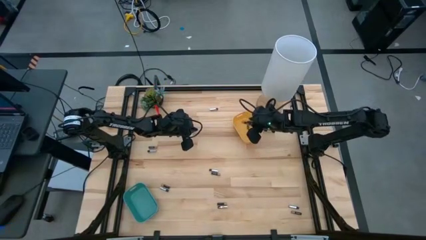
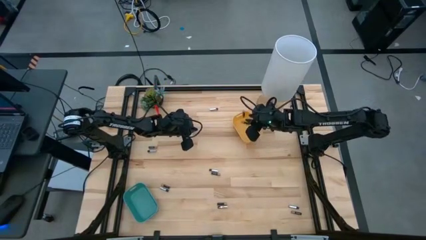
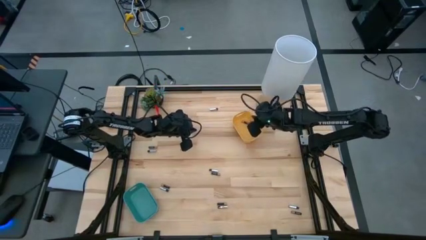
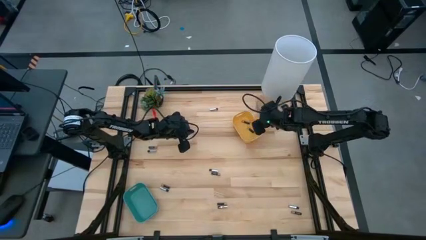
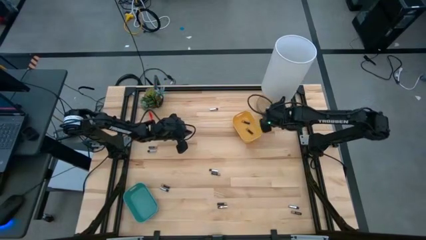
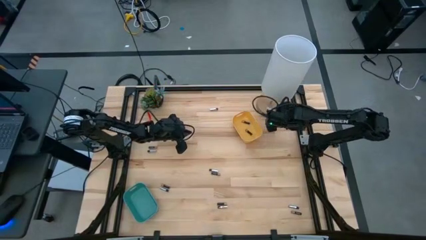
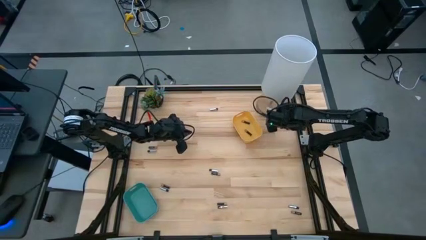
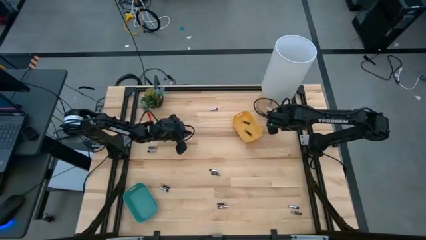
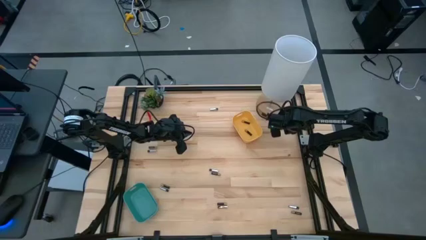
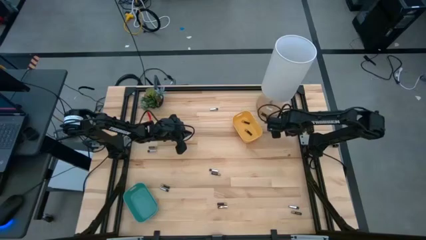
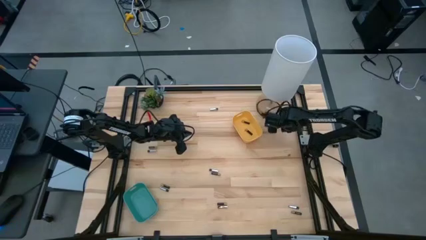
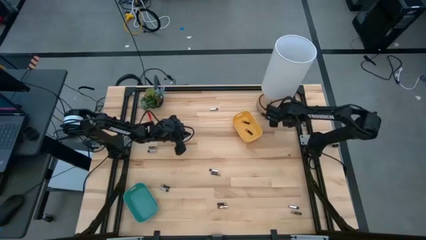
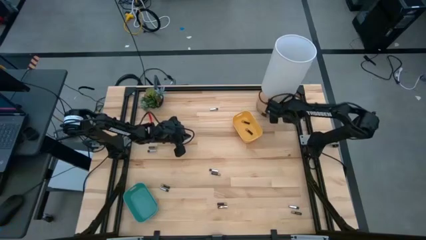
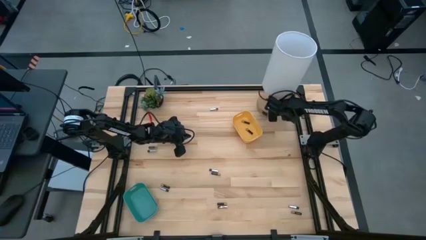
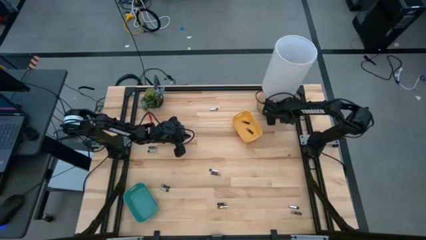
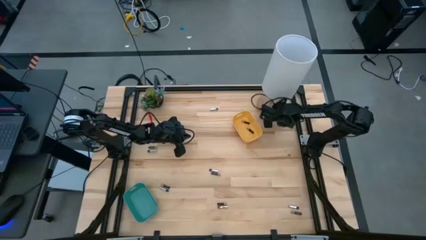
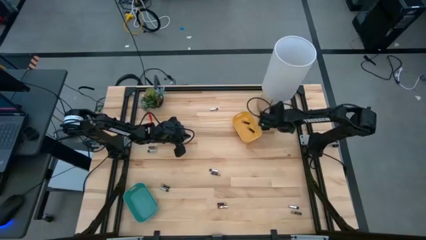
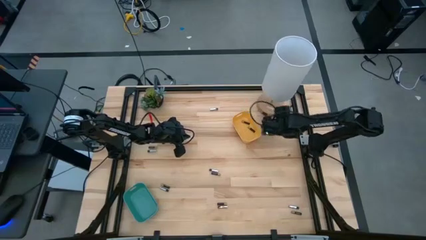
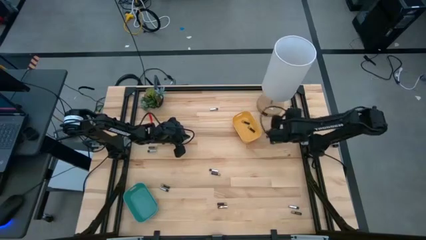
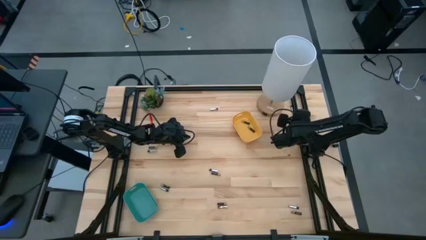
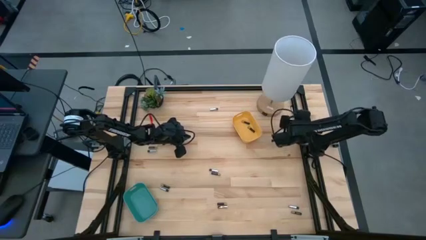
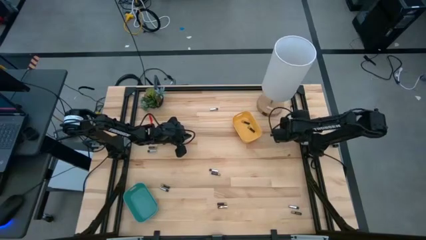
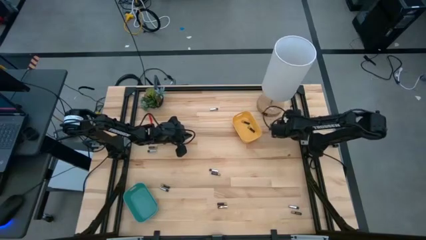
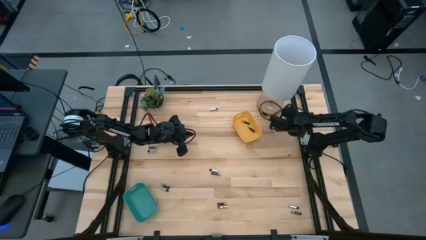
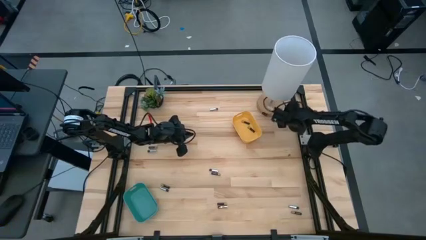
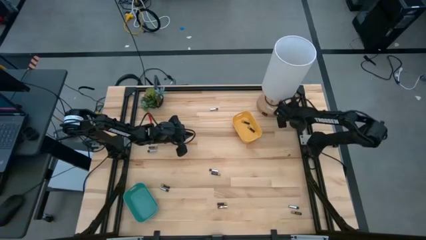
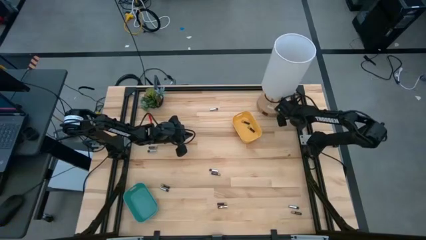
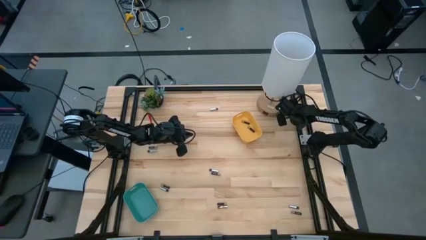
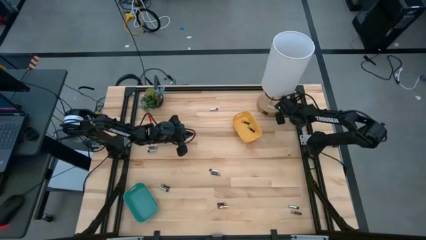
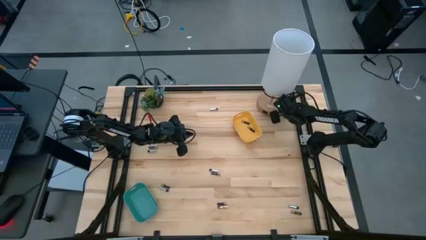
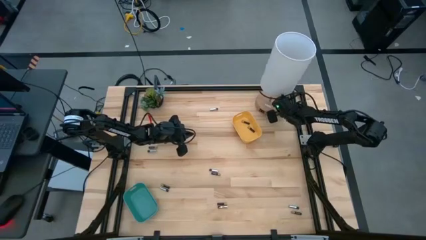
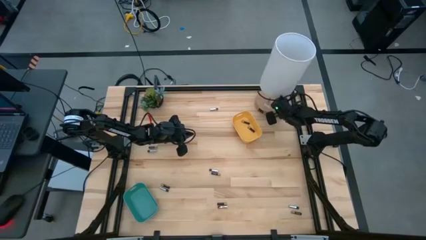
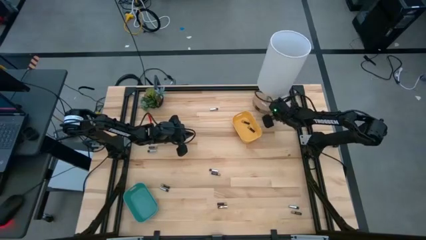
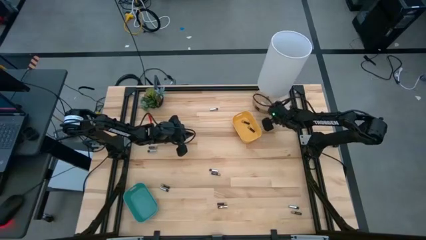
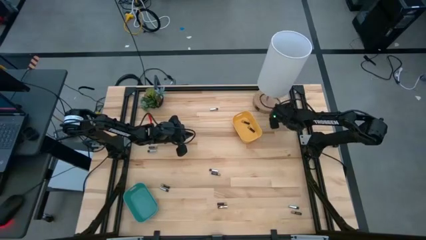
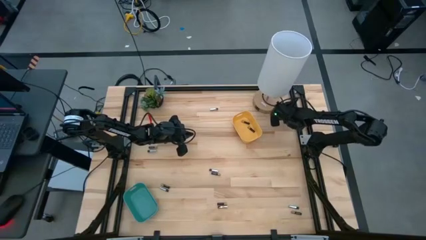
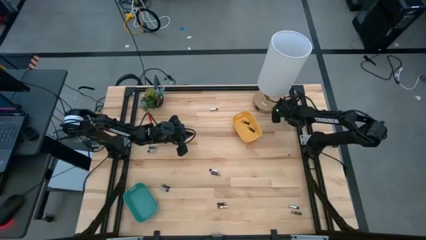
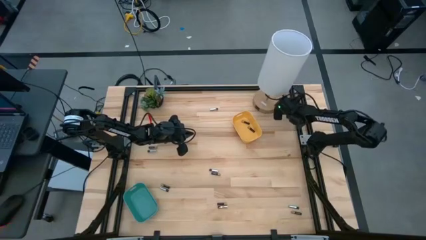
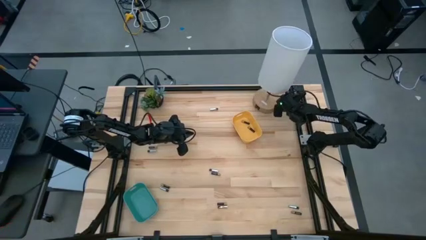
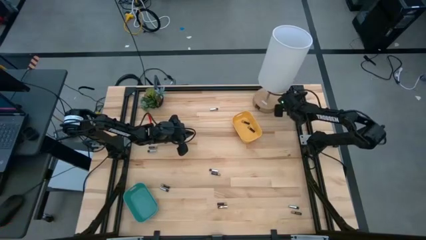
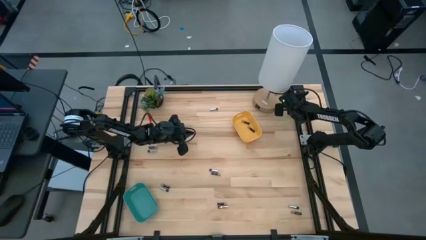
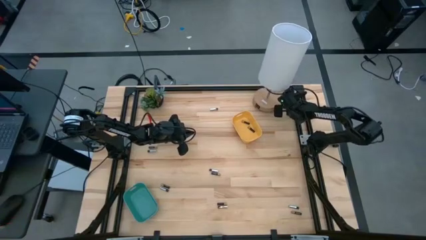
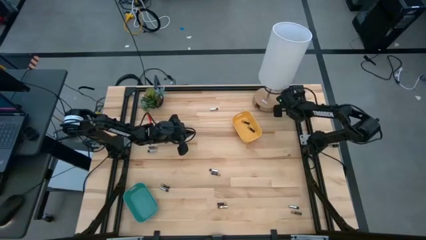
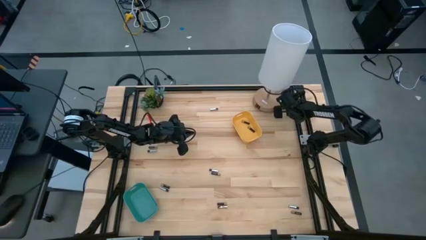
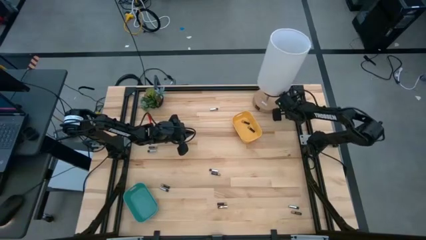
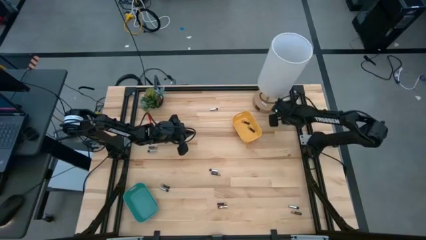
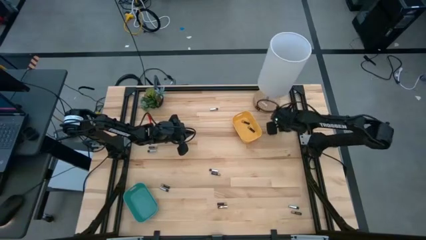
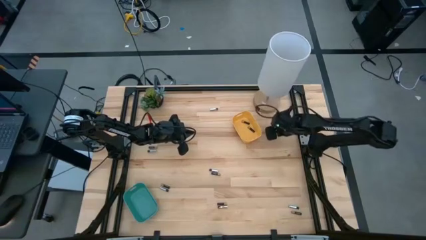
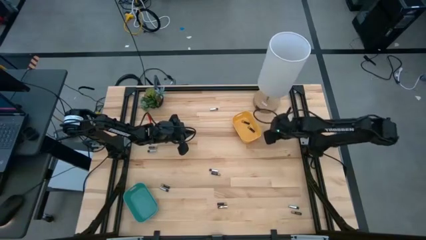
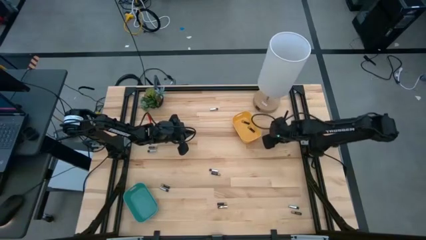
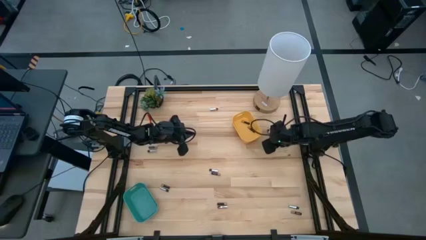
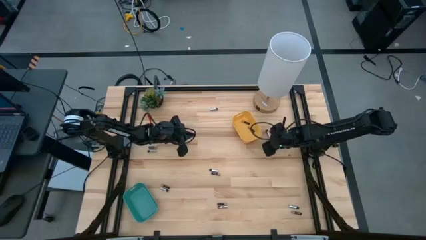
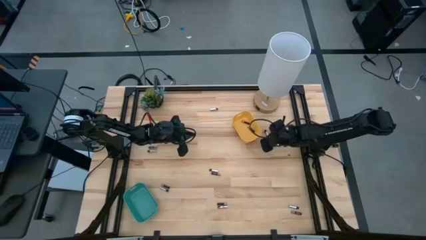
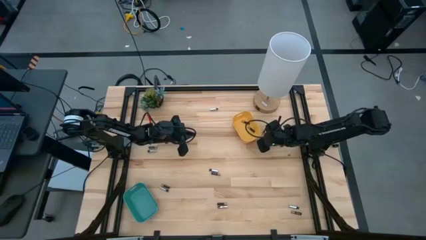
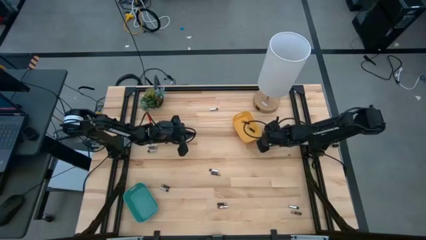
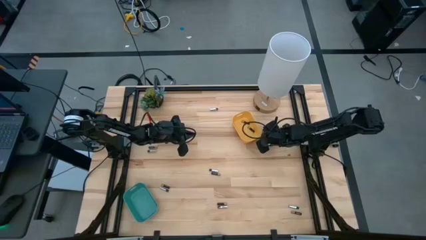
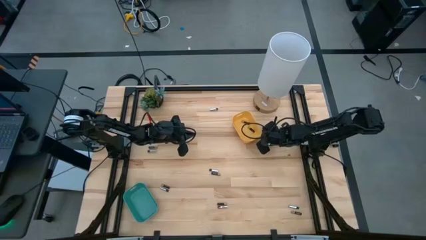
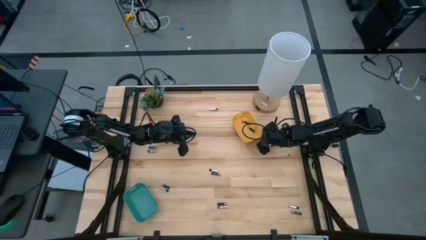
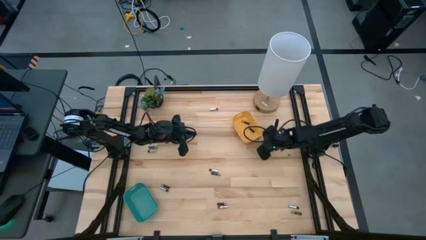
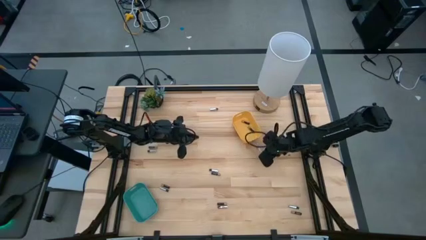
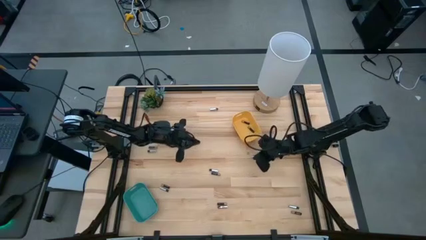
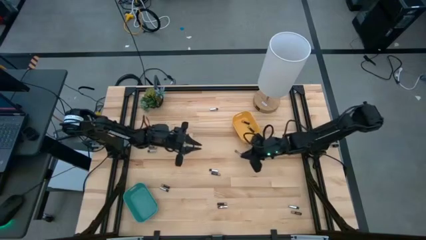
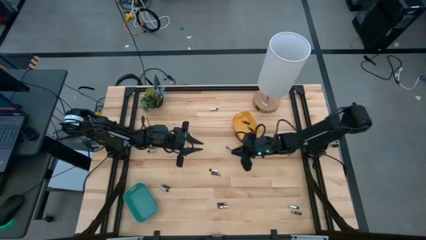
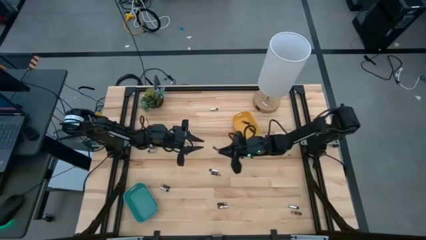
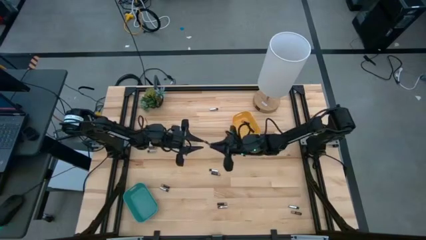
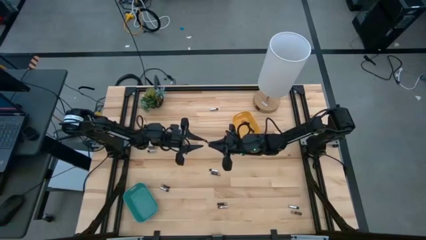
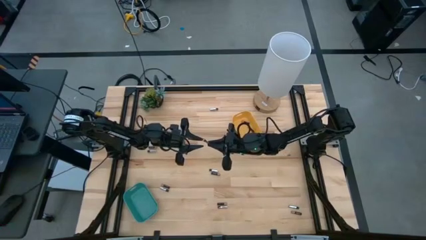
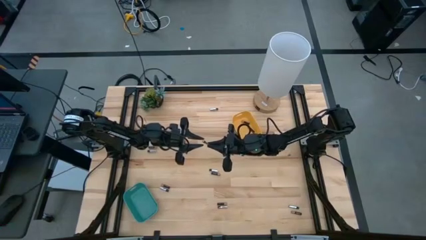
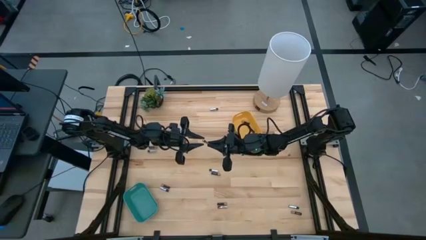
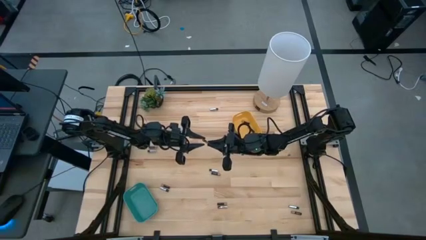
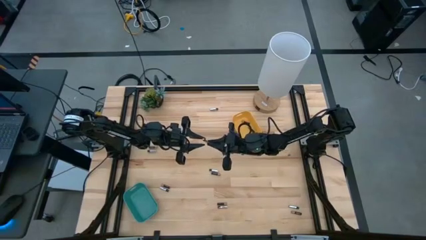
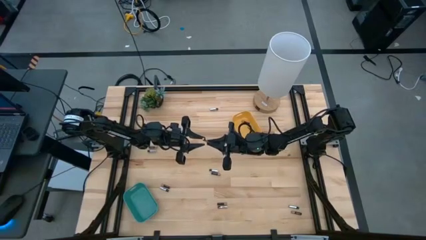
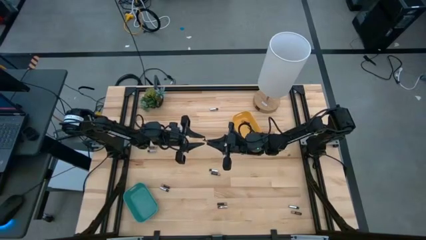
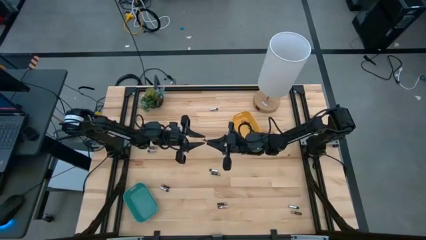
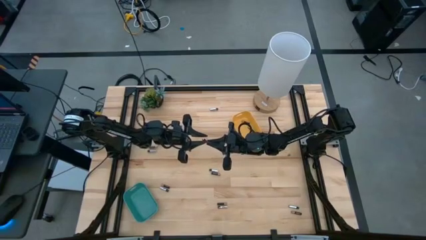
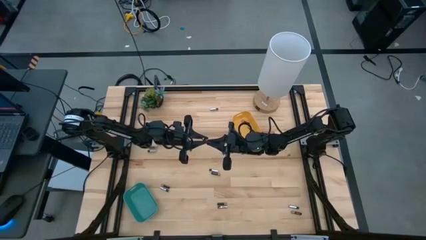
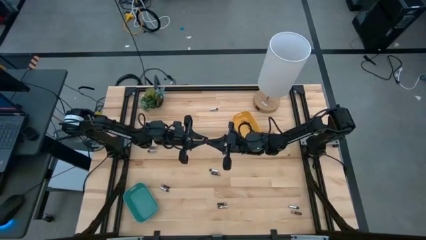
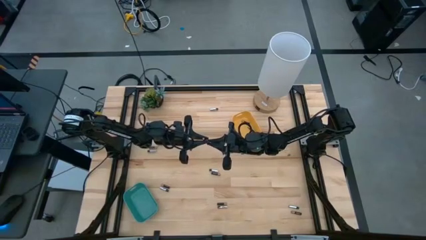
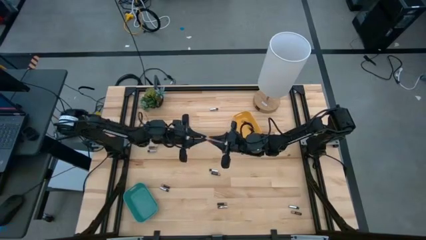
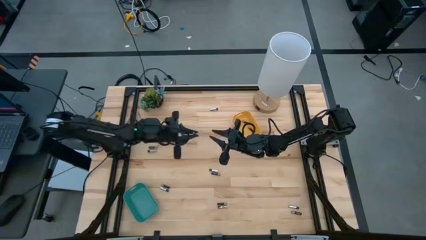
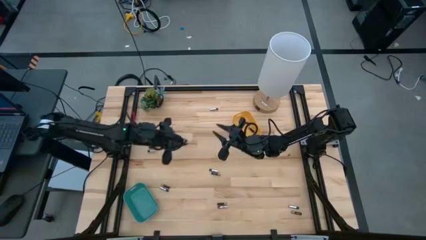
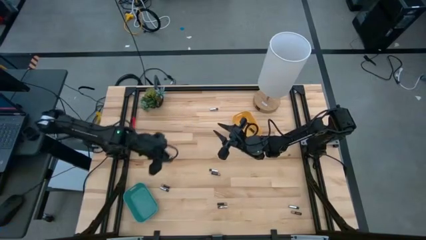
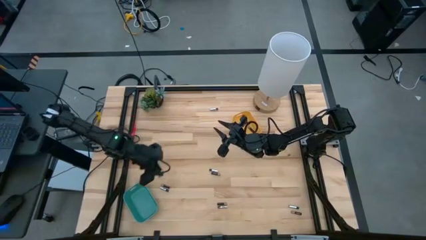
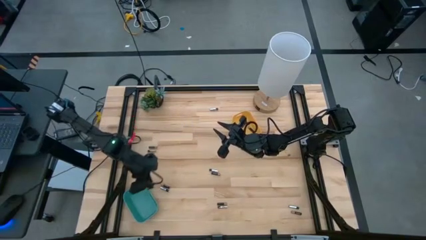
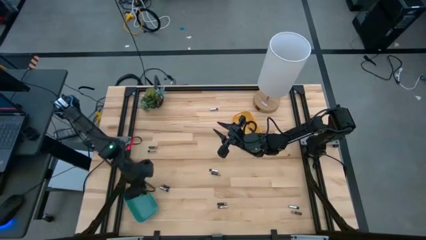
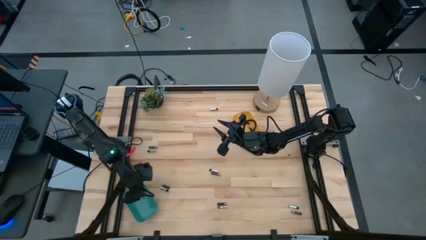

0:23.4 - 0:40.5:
Task: Sort batteries
Put the silver battery into the blue bin
